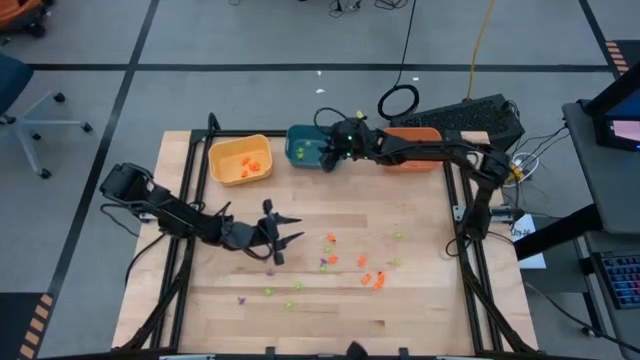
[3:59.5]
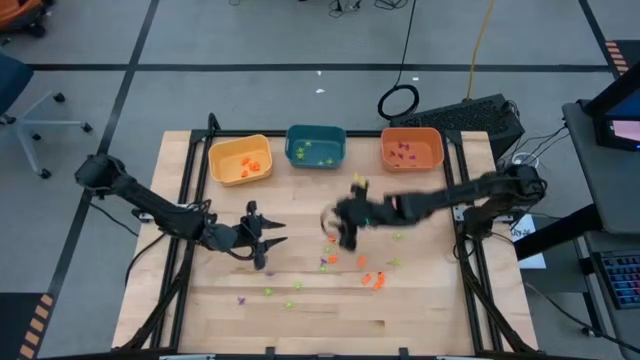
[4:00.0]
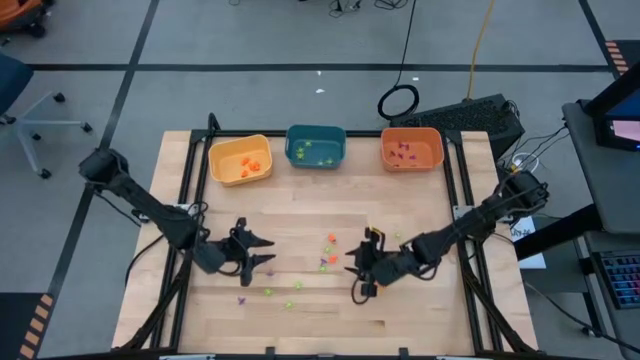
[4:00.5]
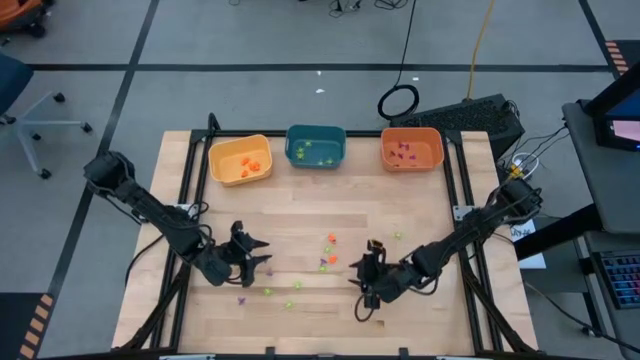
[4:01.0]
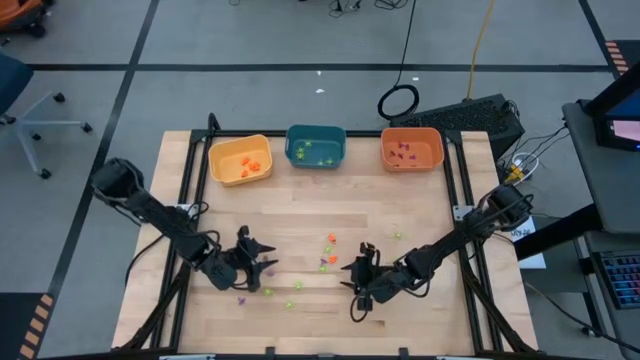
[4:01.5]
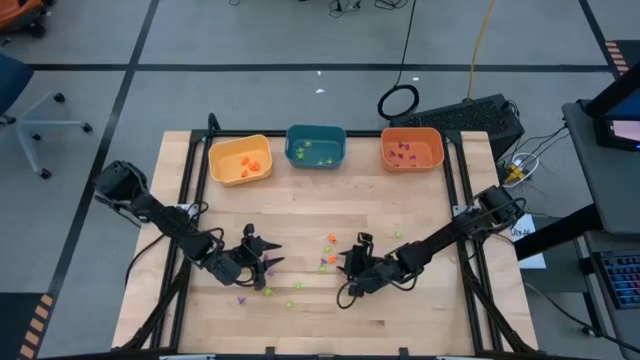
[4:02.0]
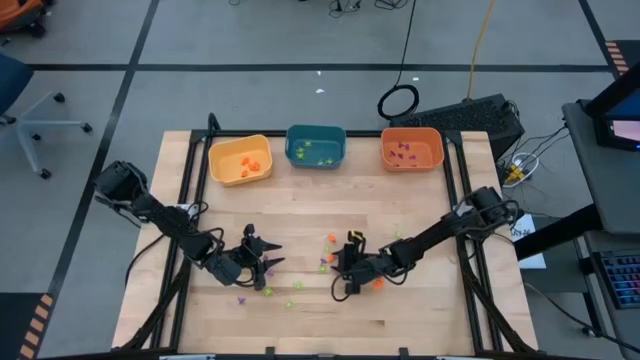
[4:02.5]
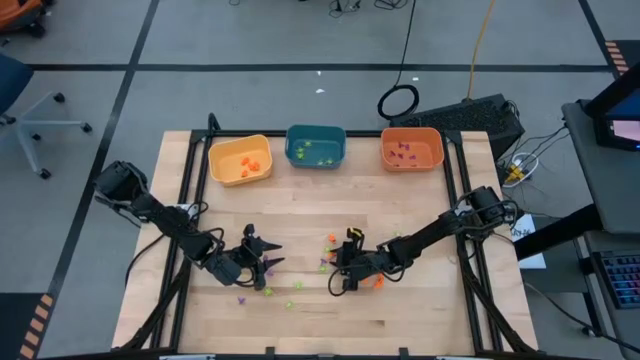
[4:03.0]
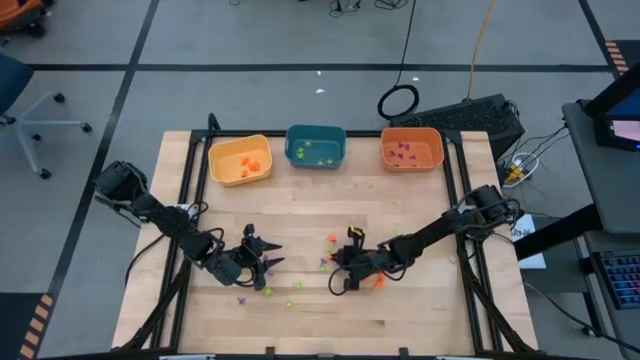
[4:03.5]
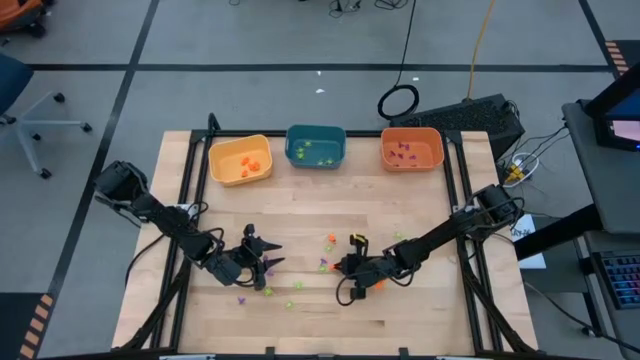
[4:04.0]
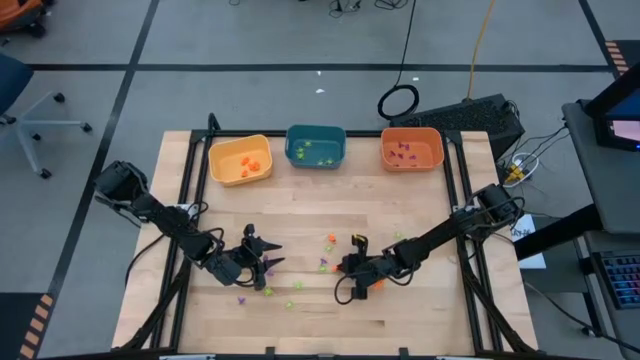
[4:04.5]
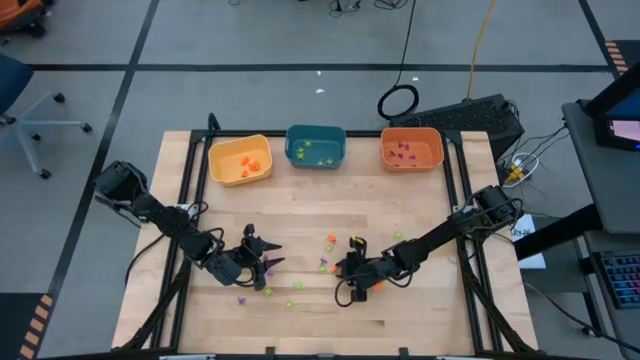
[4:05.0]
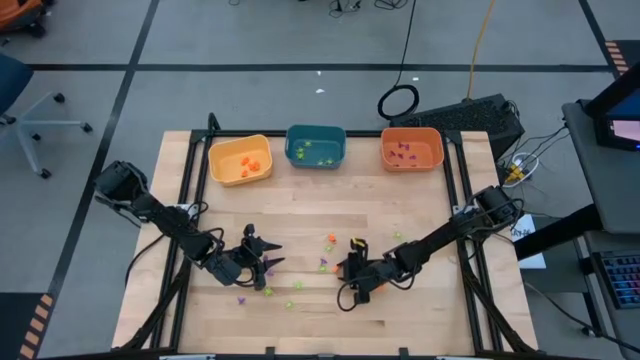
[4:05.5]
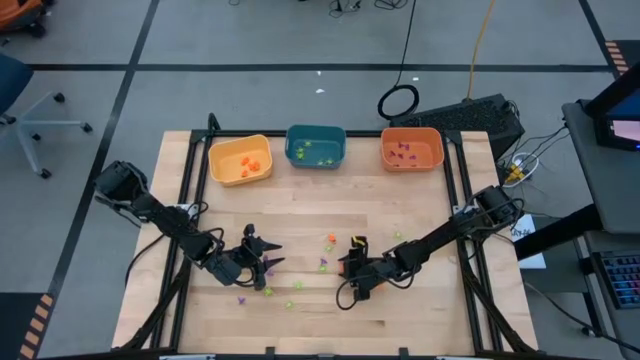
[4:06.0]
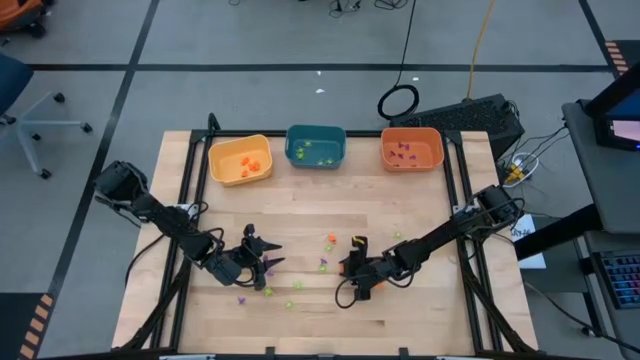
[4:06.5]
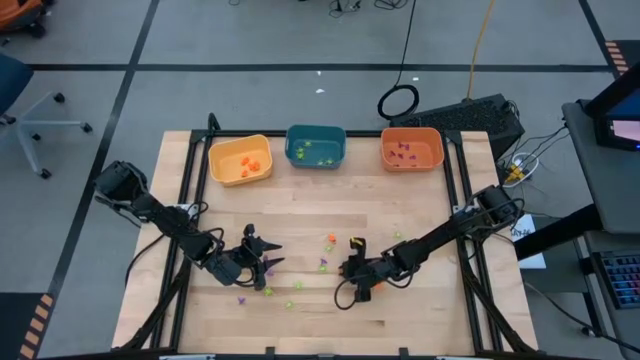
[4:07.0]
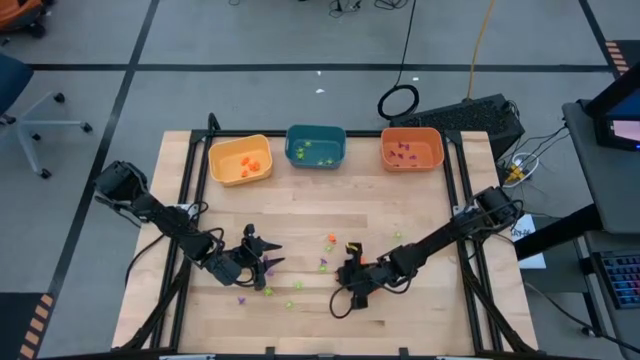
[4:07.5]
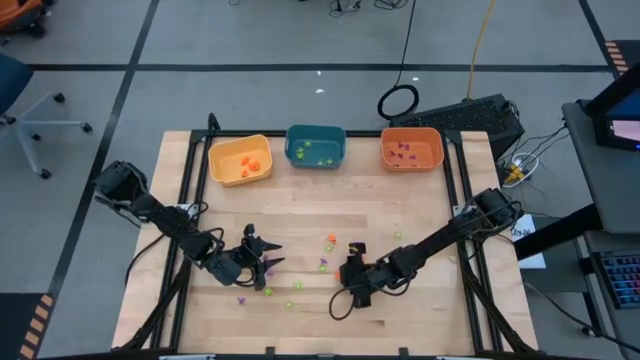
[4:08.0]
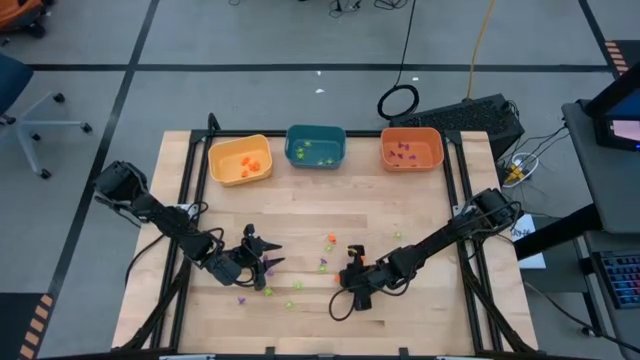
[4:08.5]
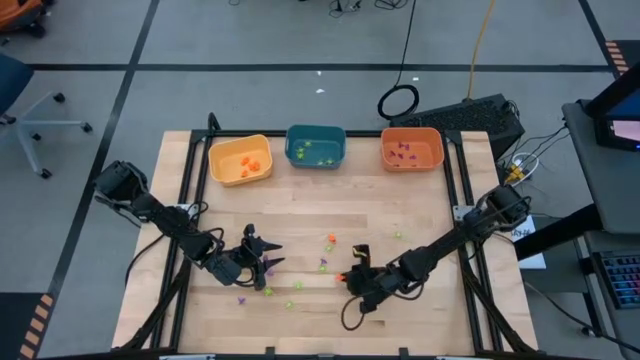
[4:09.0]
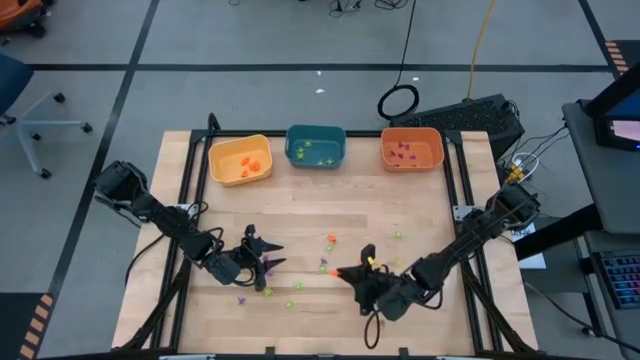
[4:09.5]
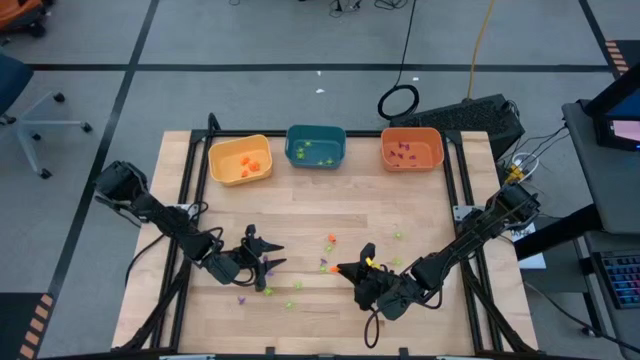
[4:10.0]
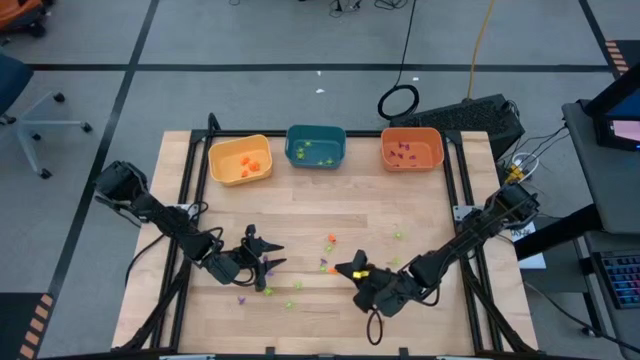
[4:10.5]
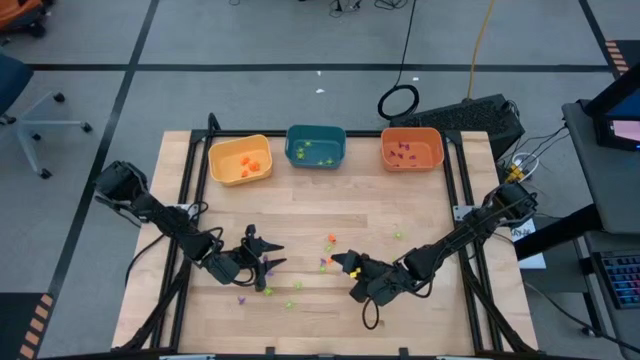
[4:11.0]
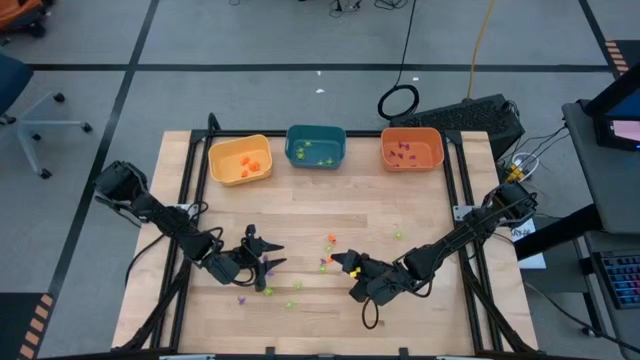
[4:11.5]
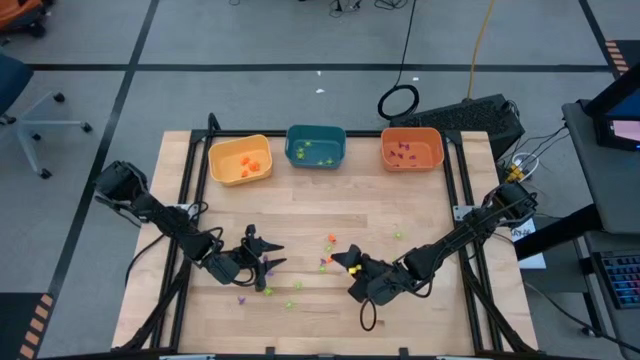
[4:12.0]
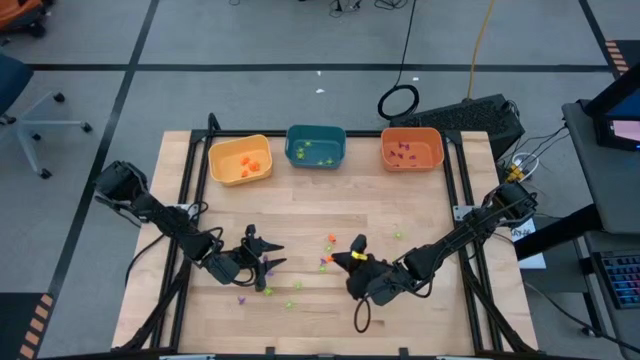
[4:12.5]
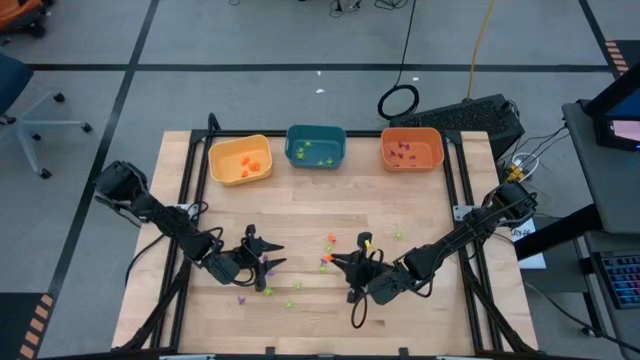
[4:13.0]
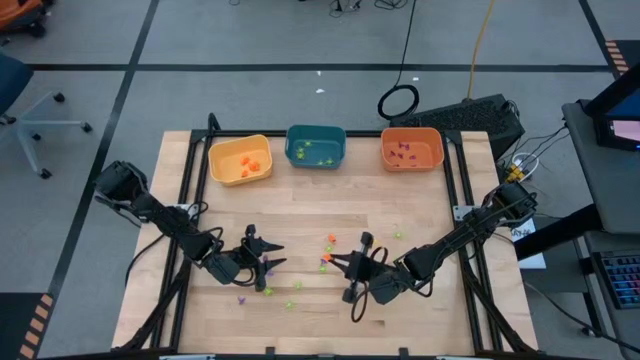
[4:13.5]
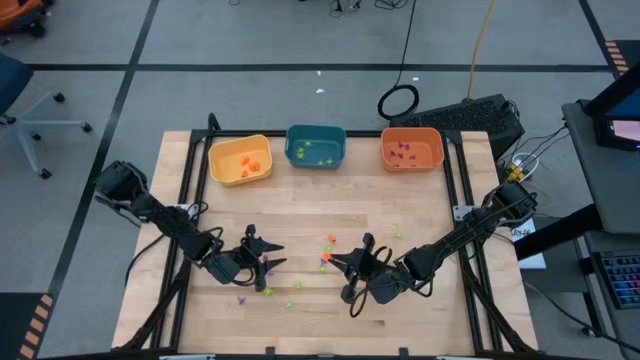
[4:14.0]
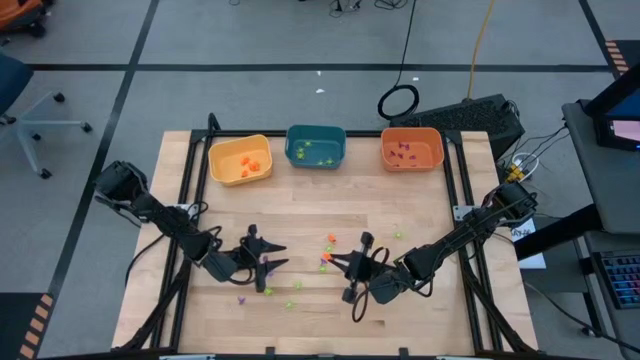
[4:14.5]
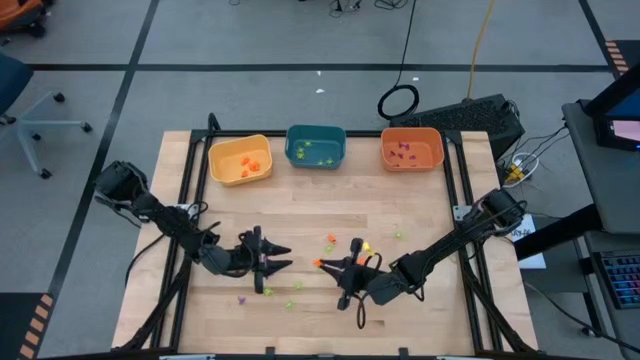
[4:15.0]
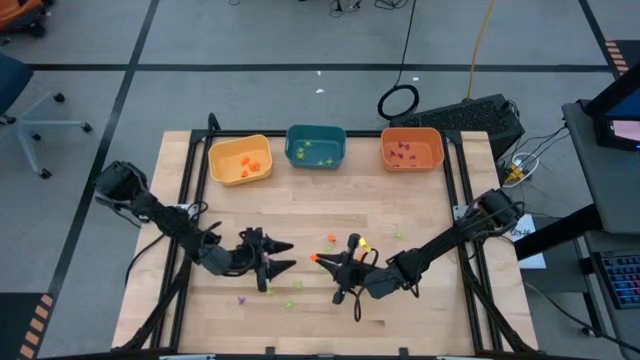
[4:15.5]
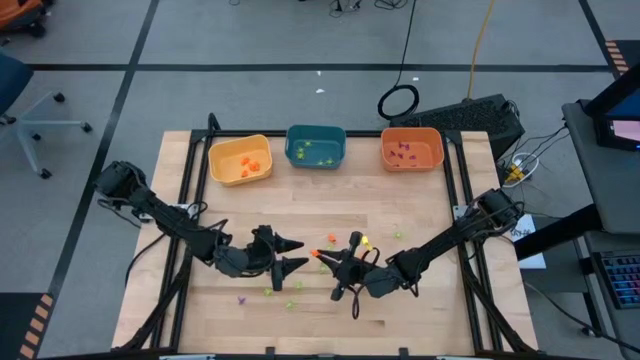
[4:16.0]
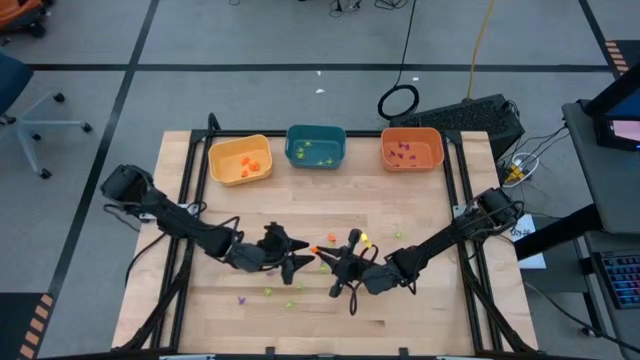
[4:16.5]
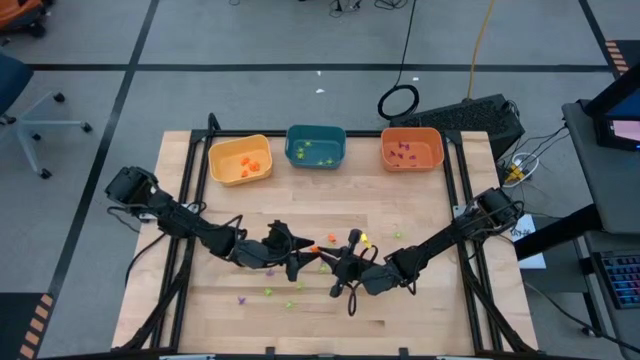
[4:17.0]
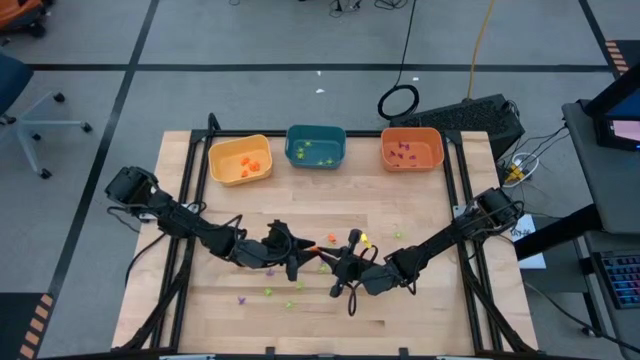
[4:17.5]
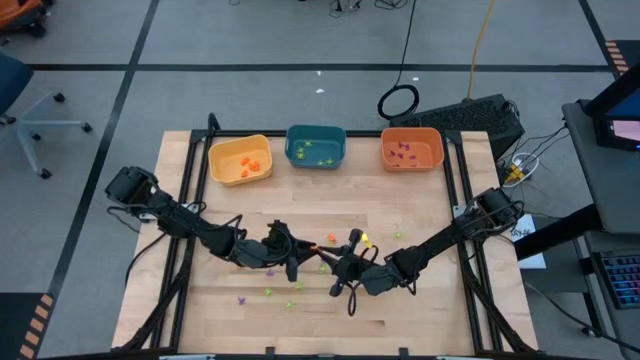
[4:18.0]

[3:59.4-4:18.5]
Task: Sort Halloween decoration
Put the orange skeleton toy into the yellow bin

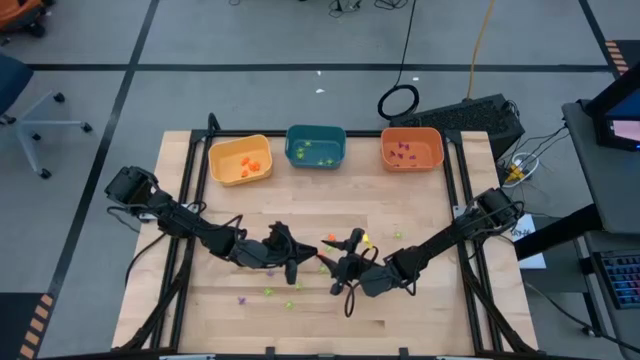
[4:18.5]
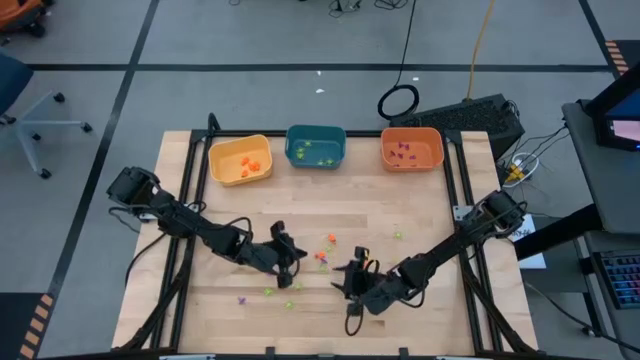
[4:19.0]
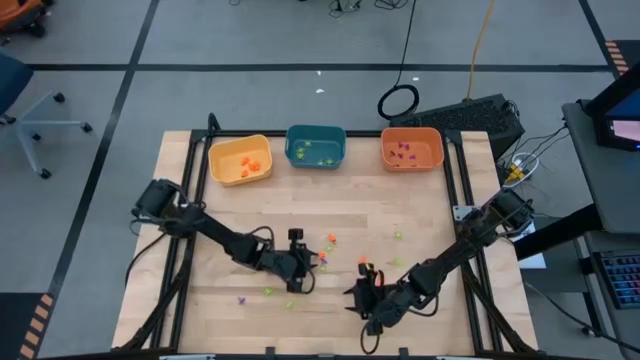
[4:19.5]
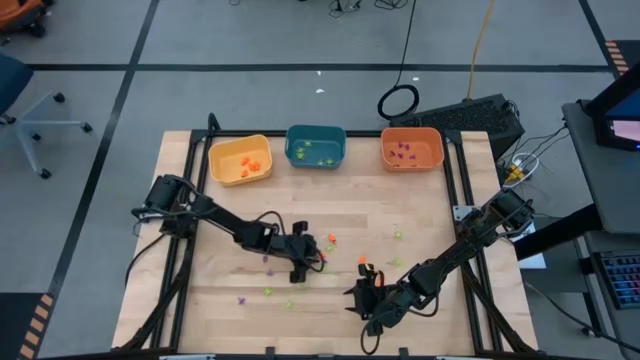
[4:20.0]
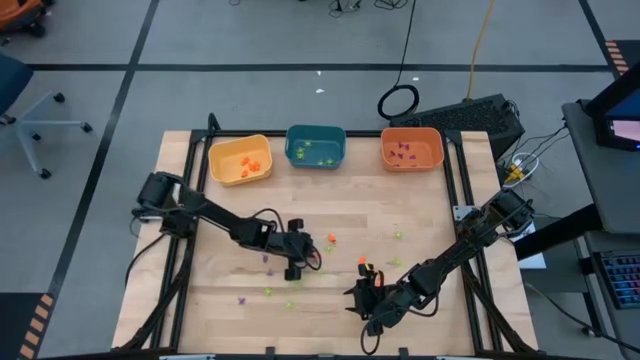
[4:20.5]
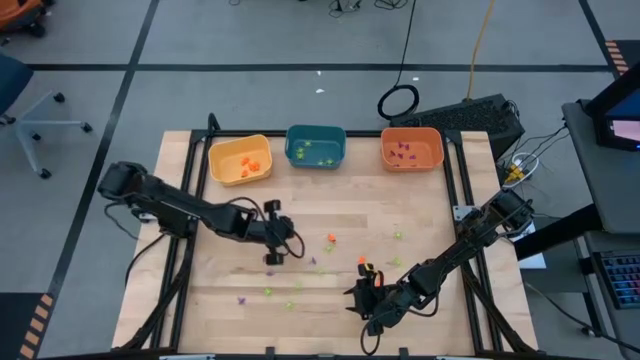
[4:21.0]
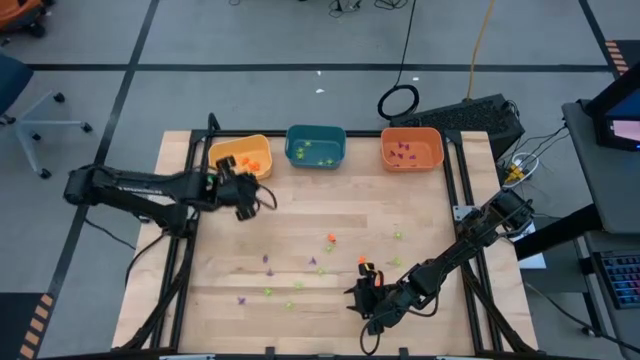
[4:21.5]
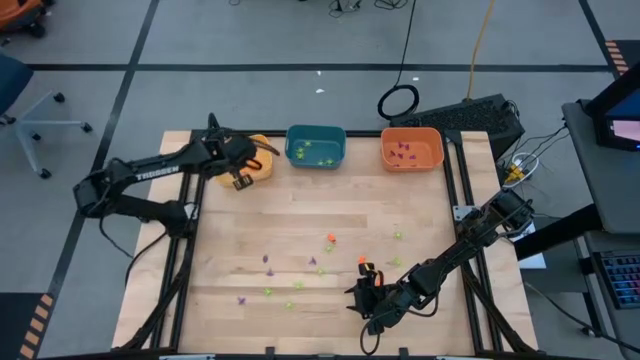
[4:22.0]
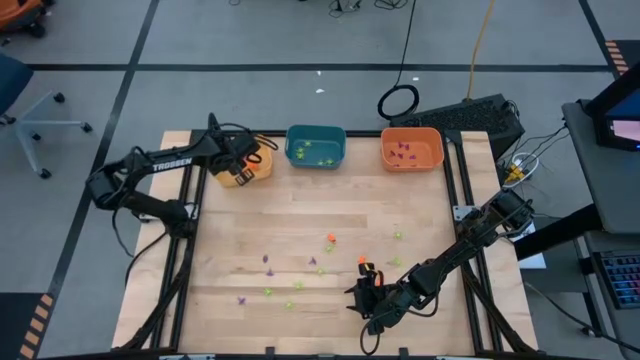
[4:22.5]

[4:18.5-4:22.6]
Put the orange skeleton toy into the yellow bin
